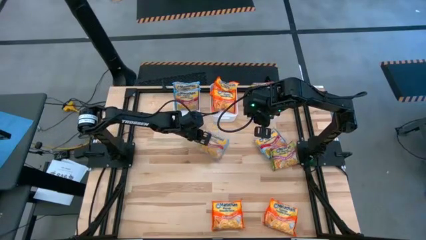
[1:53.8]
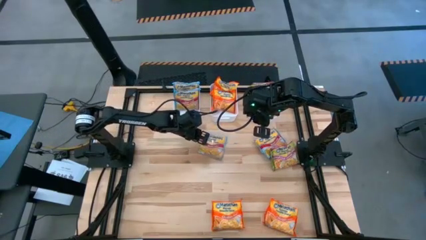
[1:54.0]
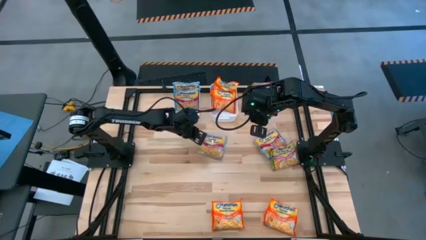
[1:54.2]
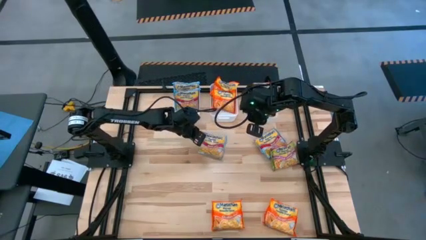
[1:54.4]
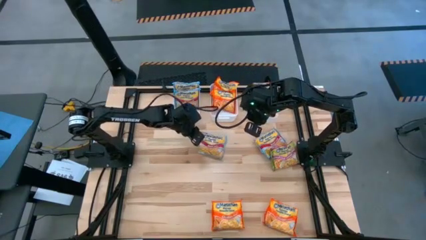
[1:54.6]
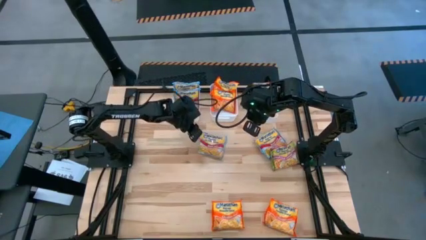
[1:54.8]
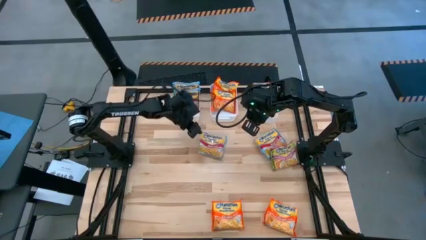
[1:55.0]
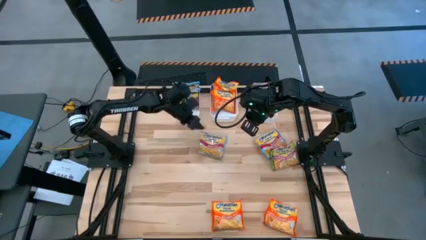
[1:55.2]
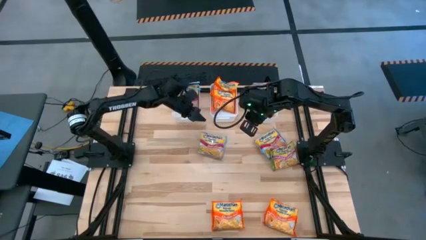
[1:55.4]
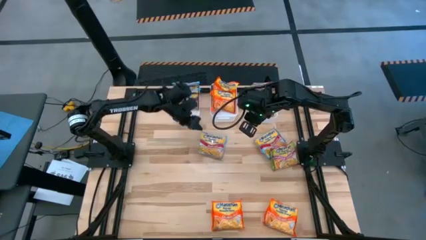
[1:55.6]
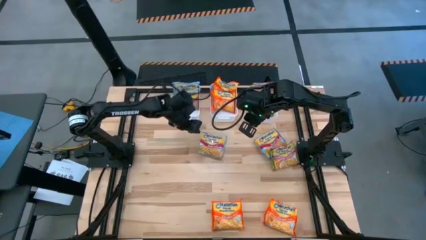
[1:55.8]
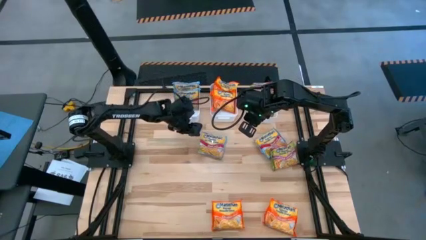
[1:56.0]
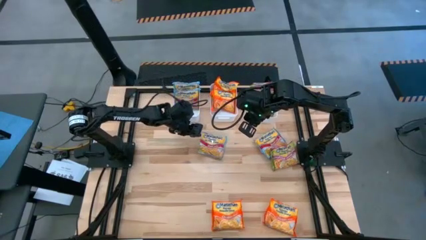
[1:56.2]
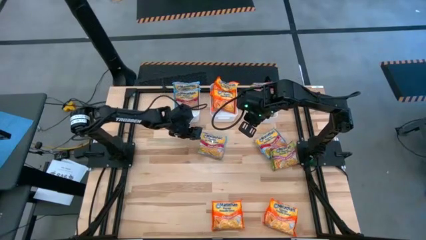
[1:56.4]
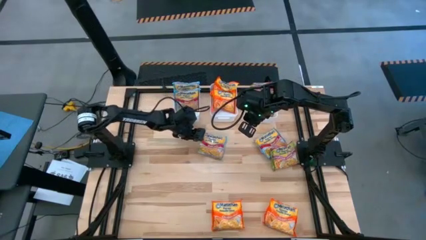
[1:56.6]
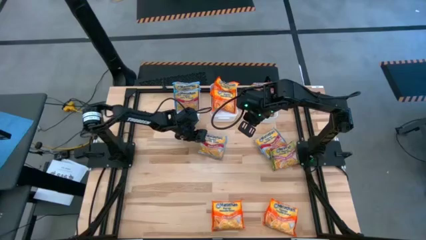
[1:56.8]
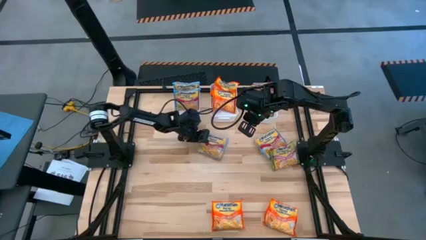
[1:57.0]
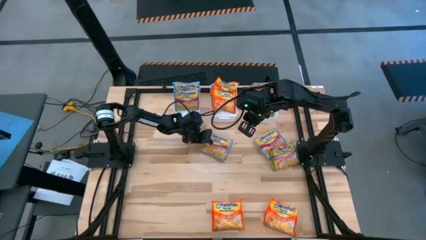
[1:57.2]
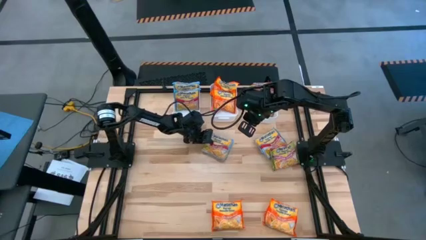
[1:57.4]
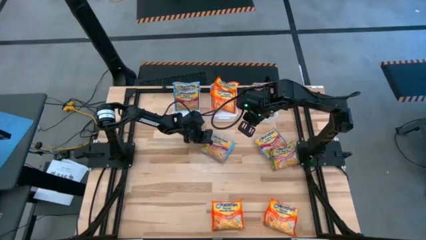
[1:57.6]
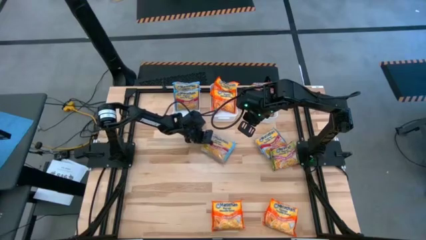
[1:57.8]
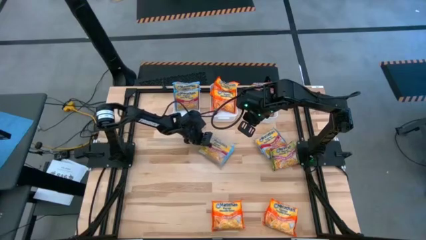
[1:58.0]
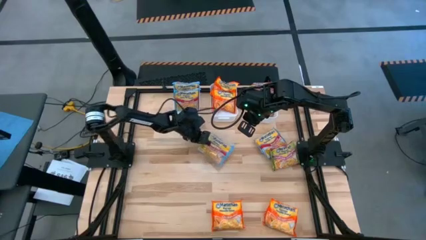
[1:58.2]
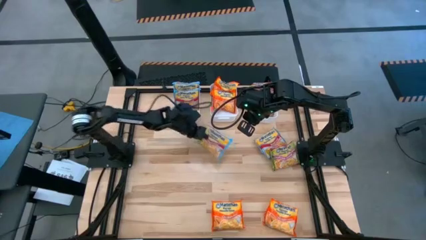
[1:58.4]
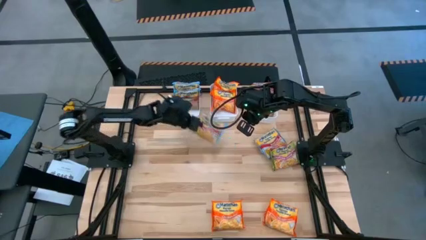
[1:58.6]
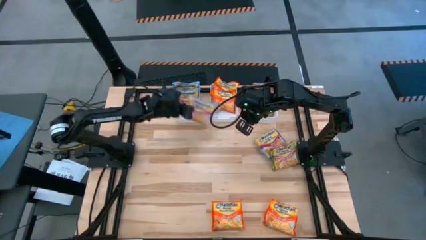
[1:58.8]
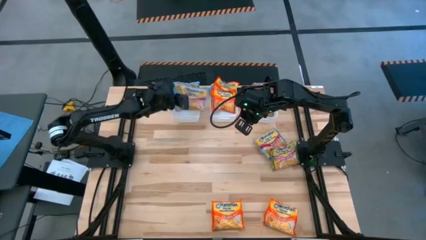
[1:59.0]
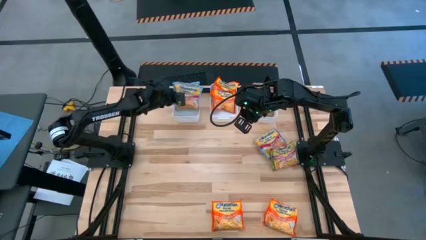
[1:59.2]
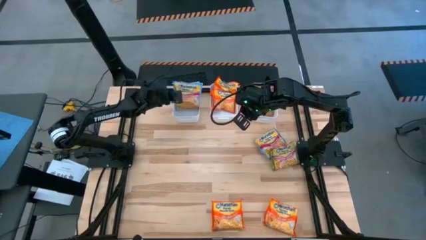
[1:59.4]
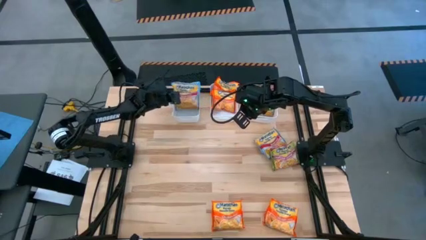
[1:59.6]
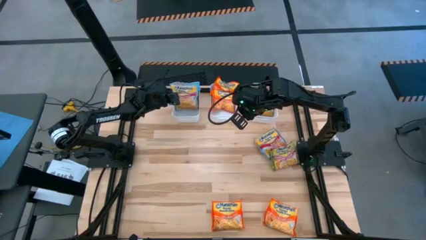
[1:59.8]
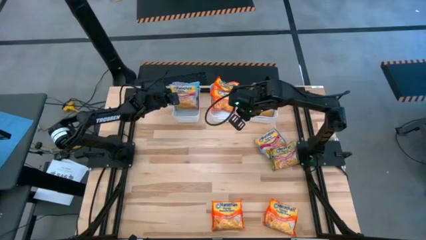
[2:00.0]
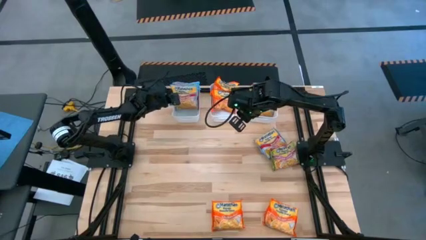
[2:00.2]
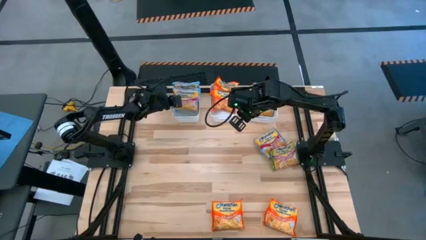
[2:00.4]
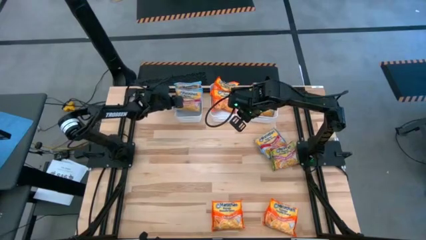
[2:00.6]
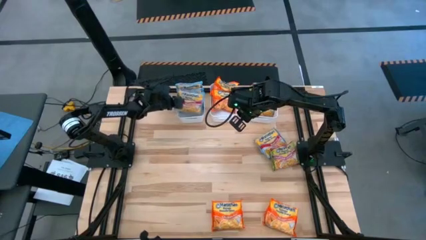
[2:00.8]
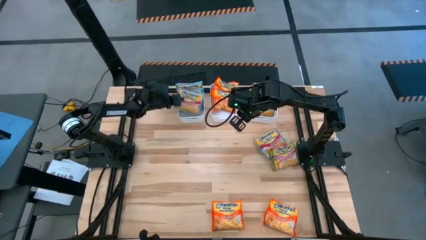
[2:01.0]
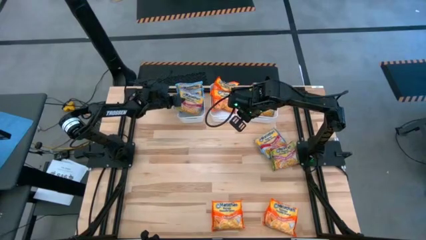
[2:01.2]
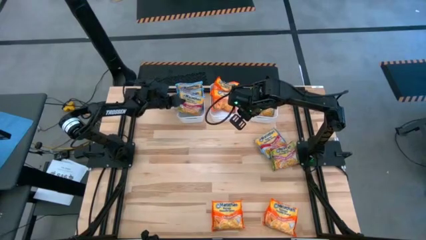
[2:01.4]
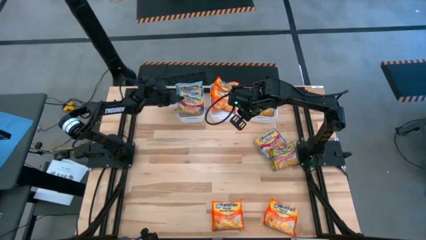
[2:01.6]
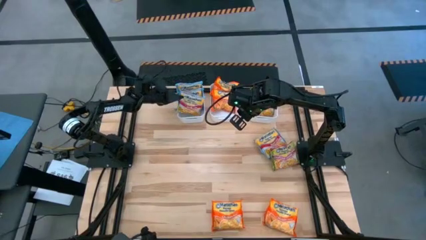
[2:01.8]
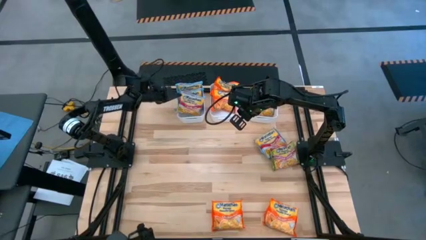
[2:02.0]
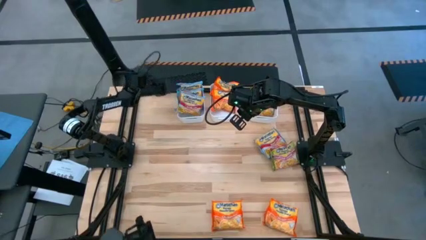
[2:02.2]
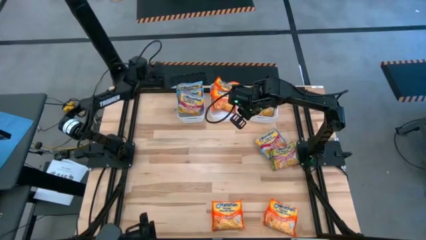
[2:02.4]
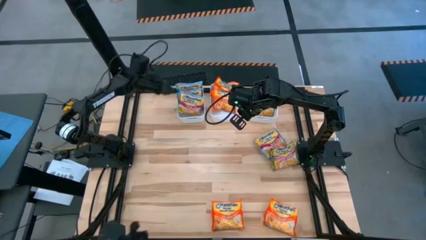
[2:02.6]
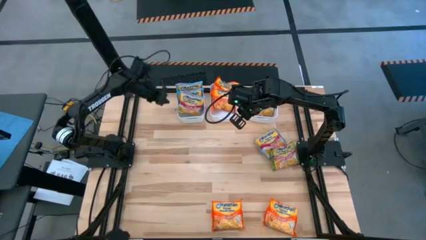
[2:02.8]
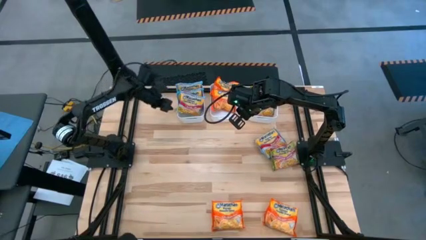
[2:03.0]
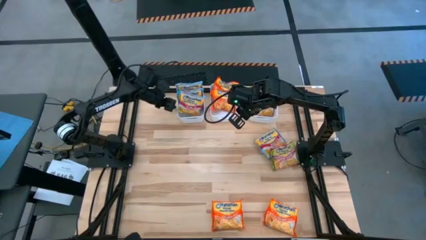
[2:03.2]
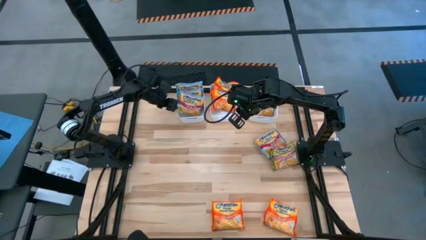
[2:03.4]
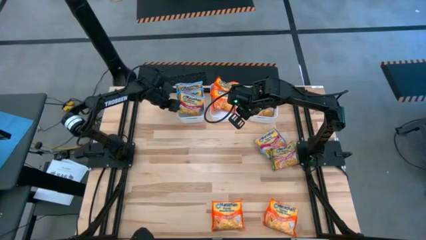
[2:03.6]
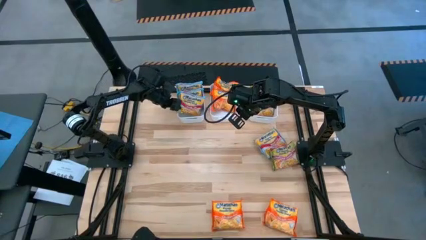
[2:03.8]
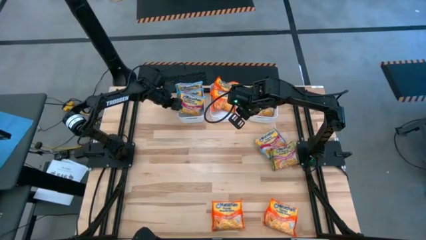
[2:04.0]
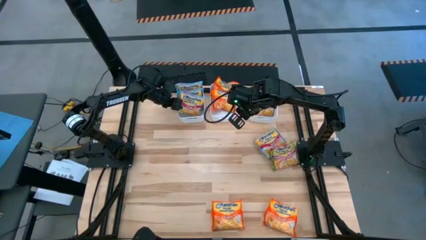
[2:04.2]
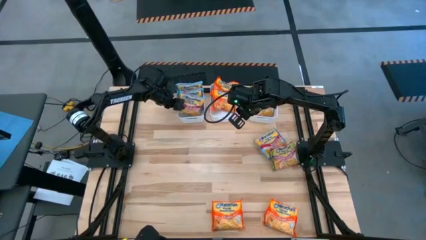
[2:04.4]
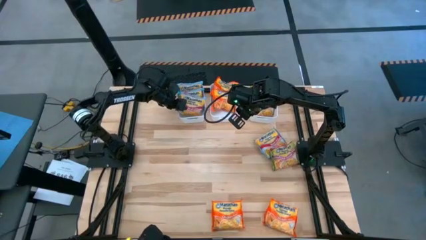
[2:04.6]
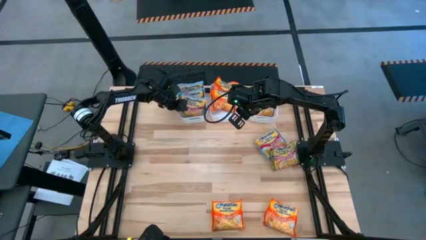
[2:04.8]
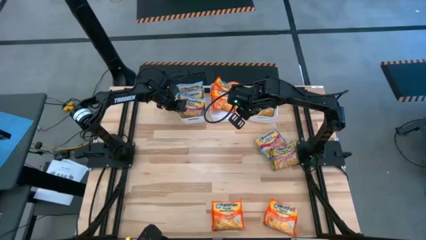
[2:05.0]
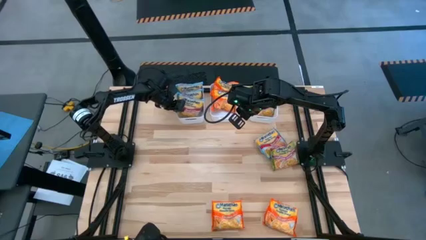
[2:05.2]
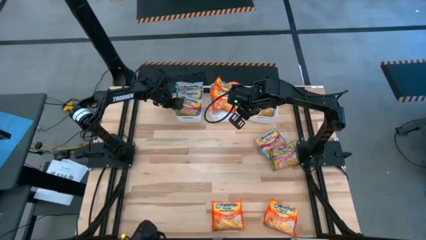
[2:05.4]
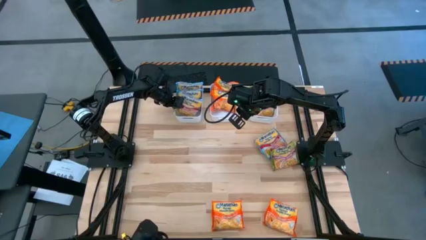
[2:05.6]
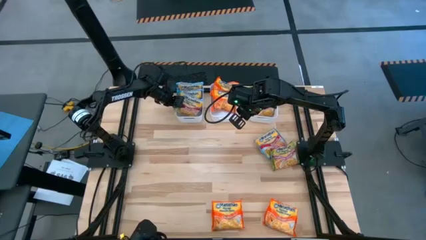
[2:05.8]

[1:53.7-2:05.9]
Task: Sort Maruchan noodles
Put the blue noodle pack into the left white bin

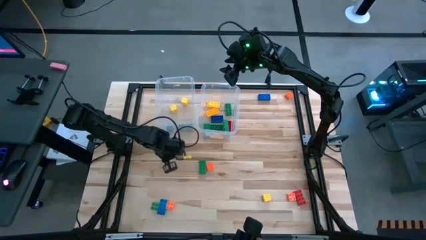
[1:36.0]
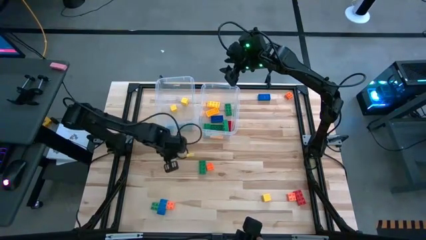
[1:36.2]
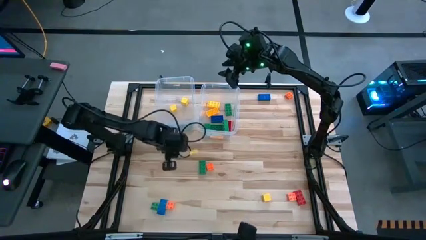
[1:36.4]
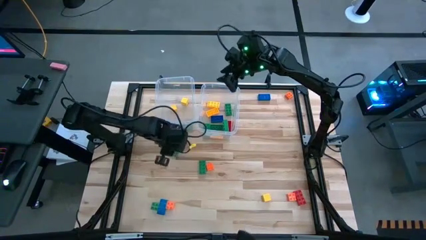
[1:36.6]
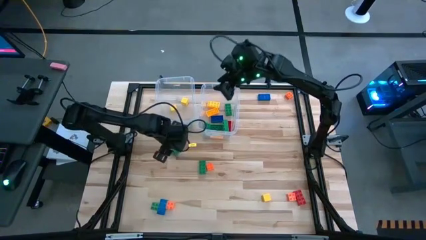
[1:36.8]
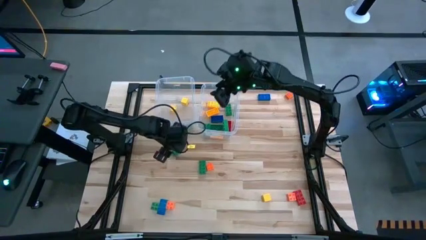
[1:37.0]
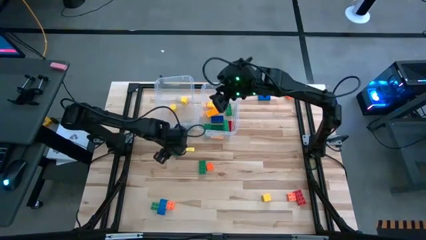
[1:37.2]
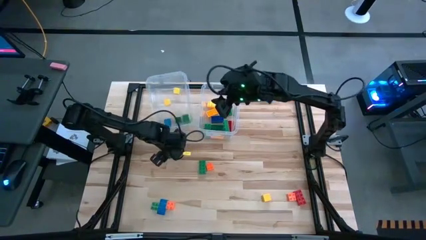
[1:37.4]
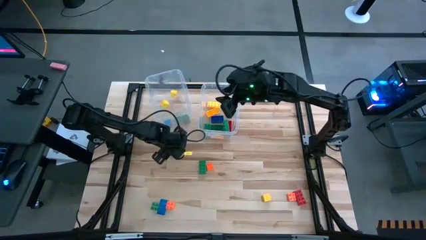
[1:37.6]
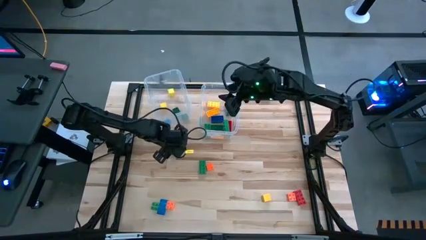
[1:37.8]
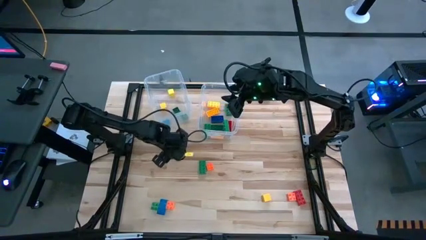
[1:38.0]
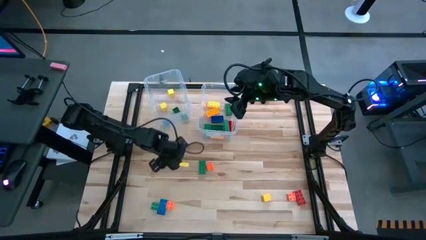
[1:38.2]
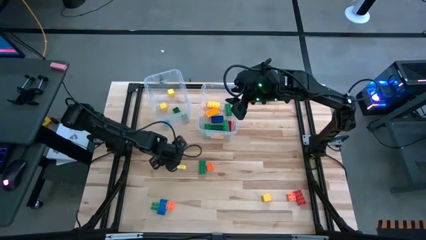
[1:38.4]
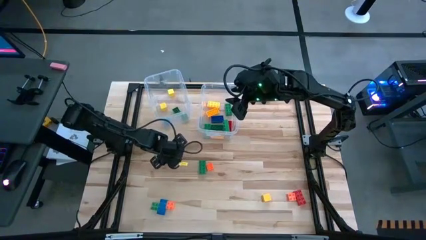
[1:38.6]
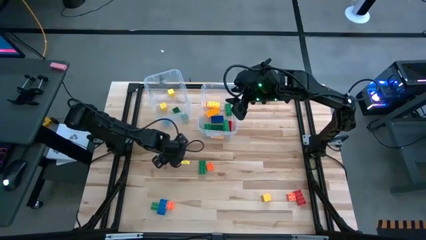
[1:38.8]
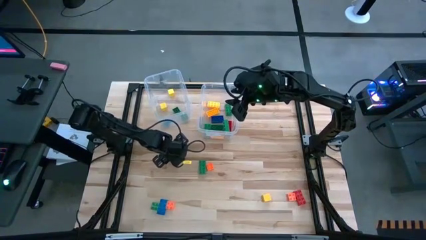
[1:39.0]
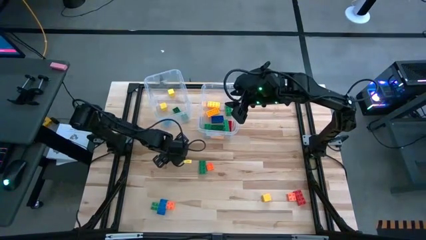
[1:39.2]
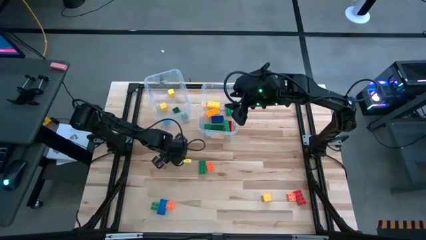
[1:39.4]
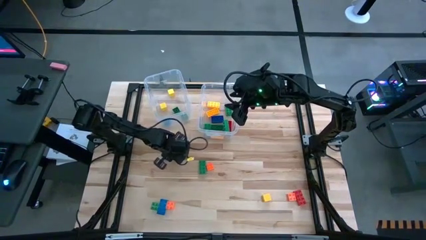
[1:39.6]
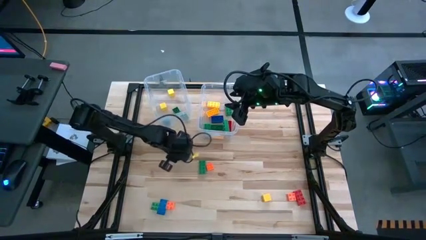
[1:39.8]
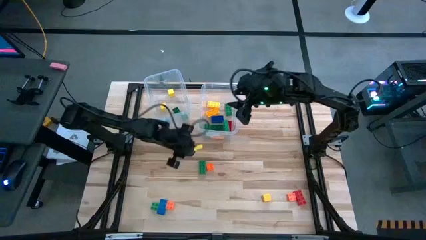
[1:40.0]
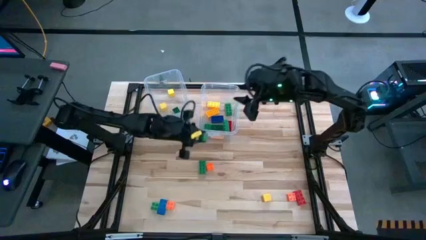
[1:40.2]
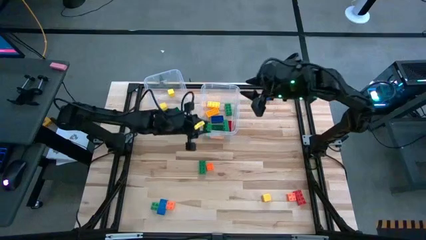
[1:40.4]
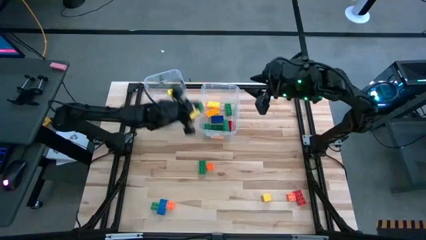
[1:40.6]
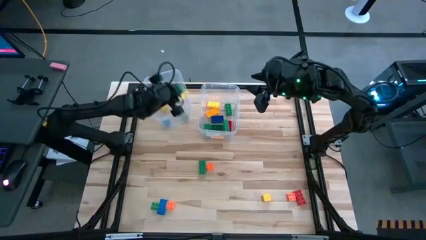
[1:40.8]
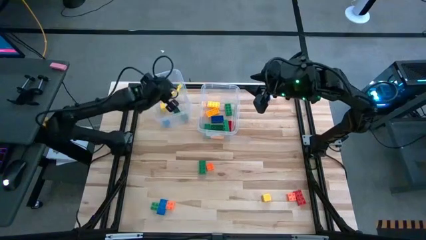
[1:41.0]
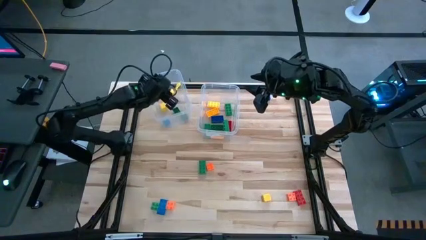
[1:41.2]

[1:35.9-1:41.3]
Task: Sort blocks by size
Put the green small game piece into the left transparent bin
